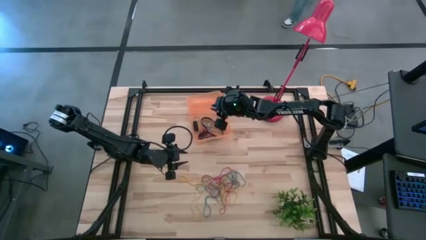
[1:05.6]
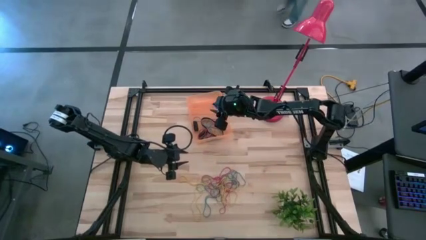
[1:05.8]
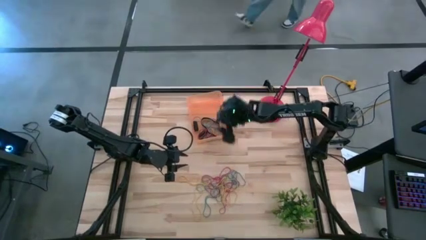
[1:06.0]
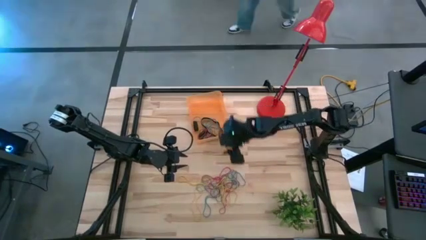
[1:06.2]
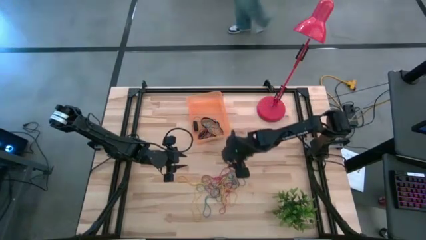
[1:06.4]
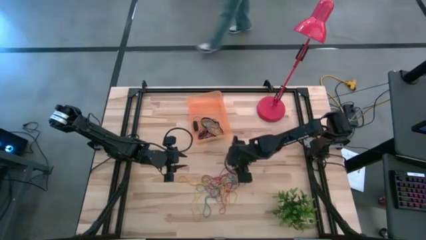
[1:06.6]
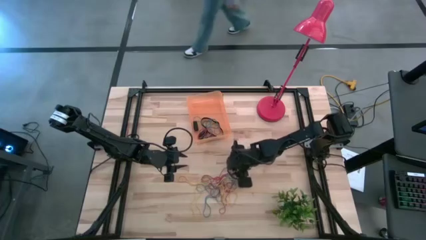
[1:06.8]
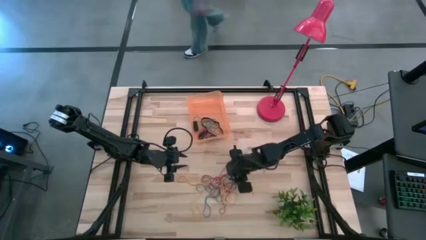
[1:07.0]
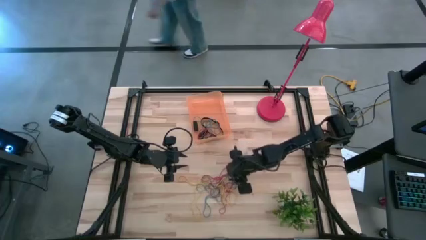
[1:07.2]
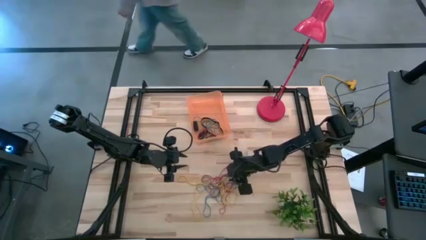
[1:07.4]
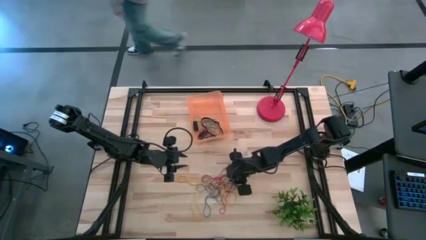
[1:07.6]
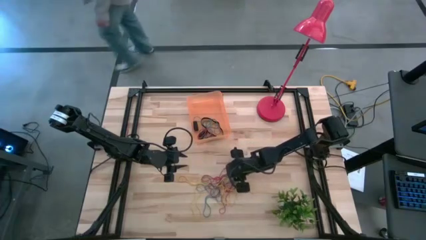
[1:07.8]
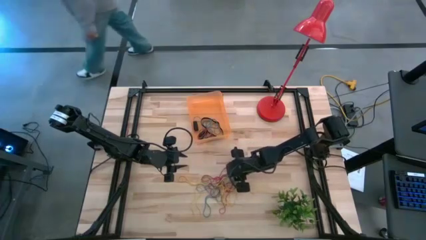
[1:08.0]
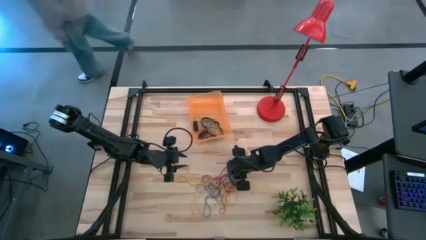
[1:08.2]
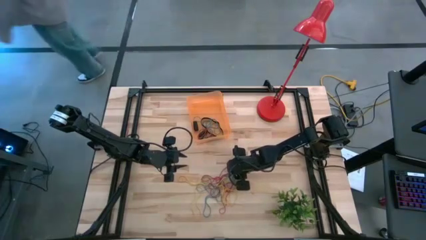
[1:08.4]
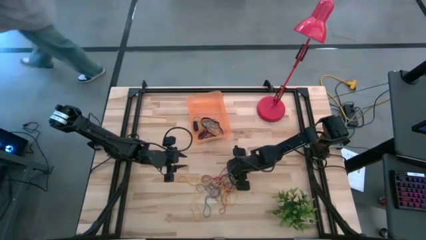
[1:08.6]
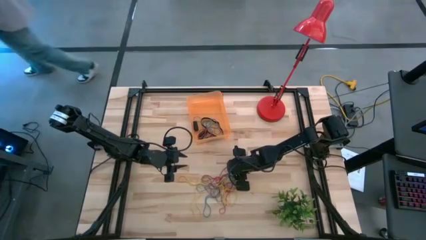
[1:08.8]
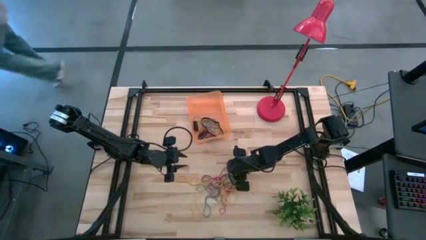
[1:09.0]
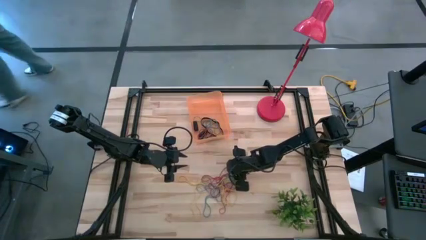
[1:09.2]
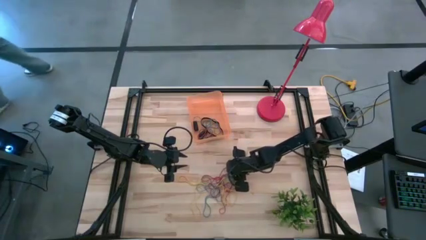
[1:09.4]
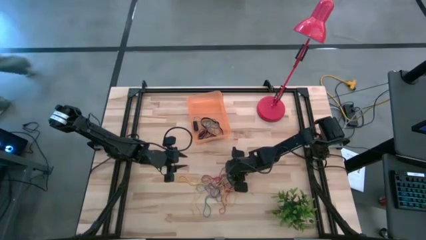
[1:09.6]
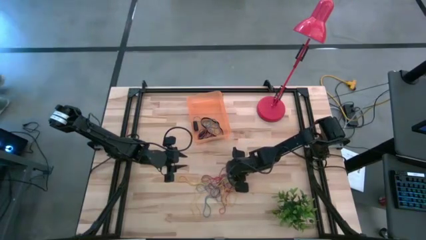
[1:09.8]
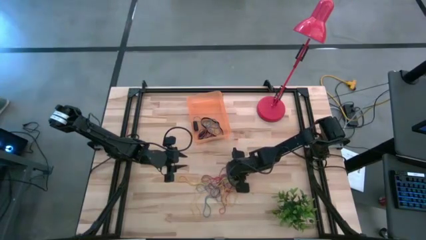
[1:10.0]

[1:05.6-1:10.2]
Task: Pick and place rubber bands into bin
Put the blue rubber band into the orange bin

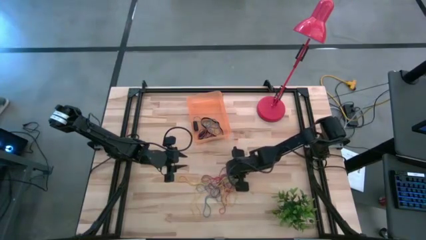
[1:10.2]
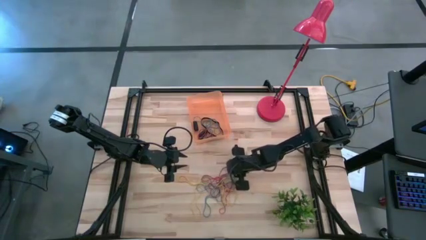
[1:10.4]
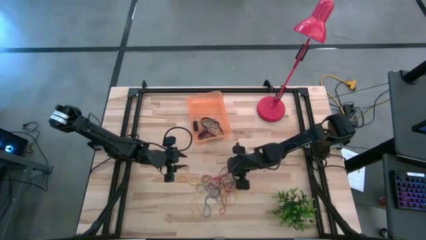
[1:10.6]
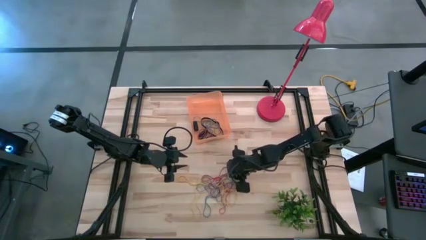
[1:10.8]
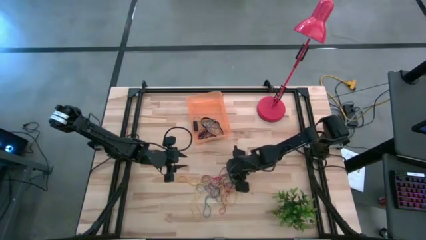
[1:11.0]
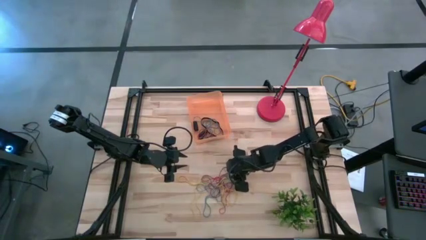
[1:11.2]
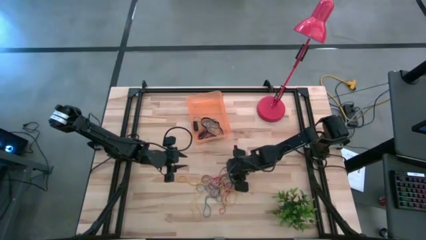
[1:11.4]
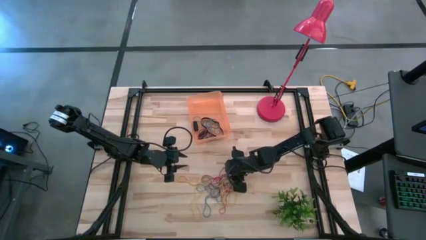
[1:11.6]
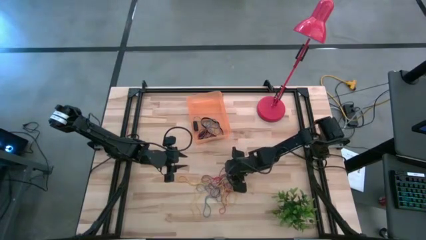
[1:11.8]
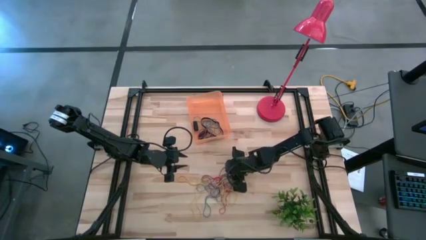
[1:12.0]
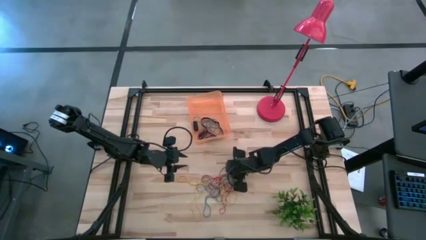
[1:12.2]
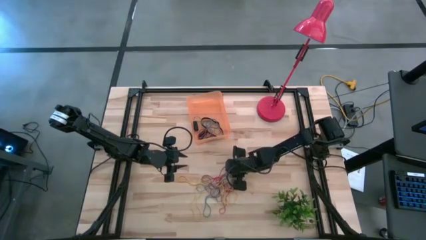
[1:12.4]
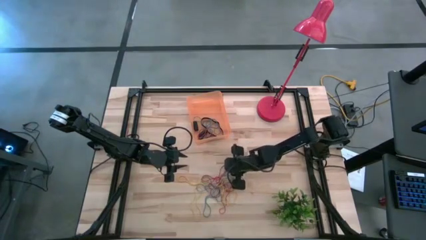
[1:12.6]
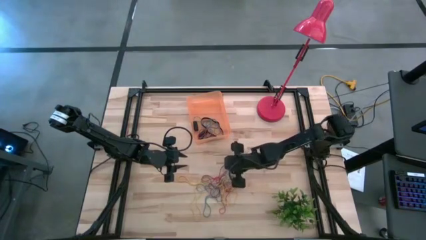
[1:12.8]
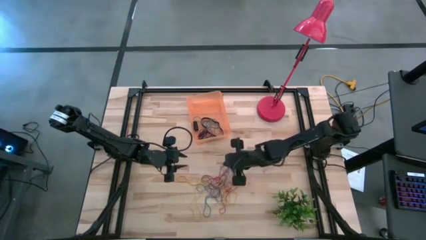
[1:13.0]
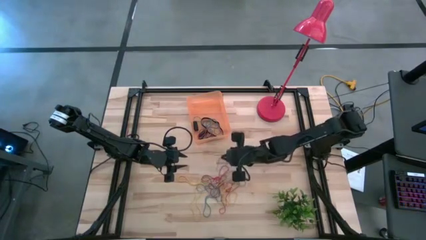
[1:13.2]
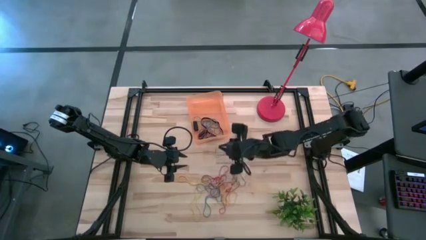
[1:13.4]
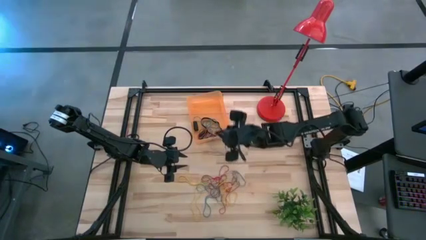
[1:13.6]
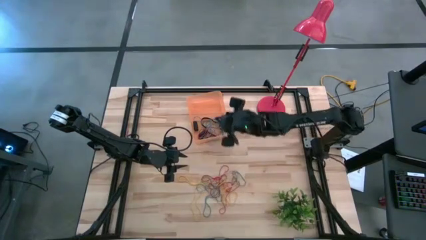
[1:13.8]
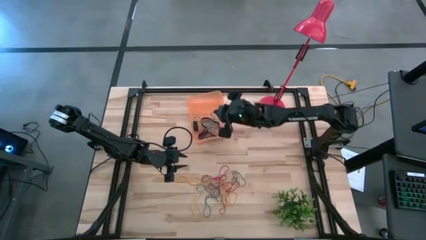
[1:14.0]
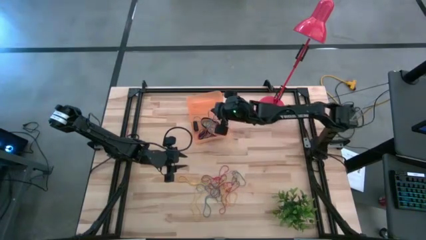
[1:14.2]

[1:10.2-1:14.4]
Put the blue rubber band into the orange bin

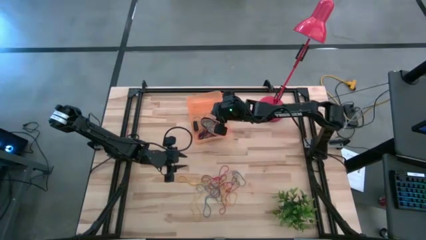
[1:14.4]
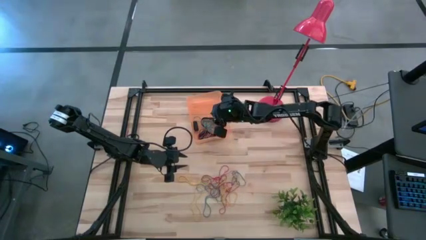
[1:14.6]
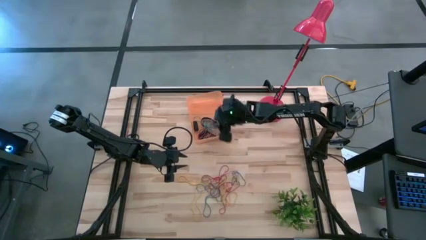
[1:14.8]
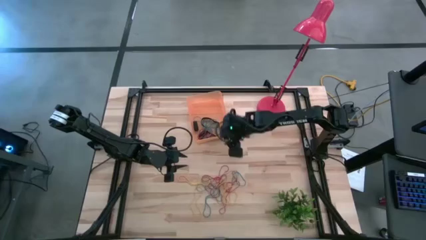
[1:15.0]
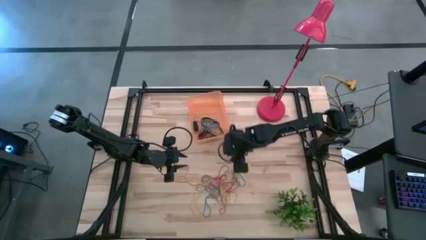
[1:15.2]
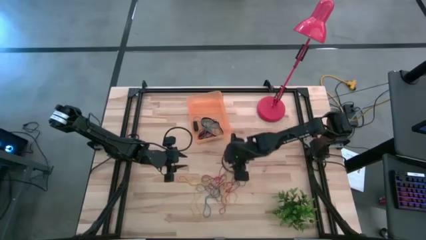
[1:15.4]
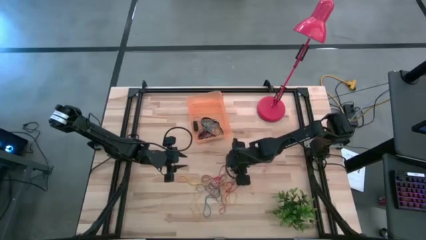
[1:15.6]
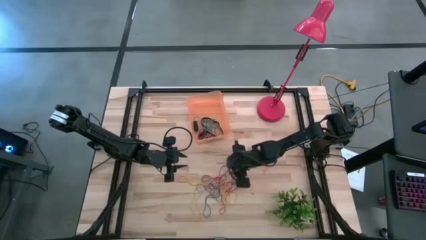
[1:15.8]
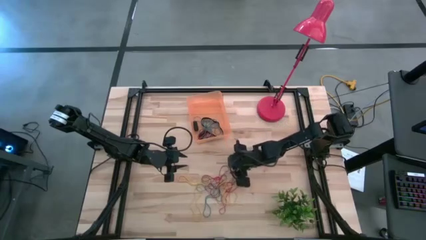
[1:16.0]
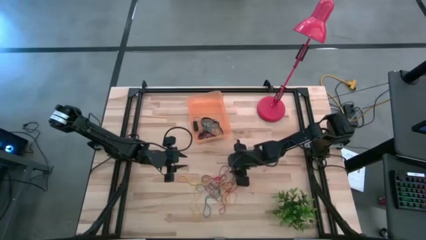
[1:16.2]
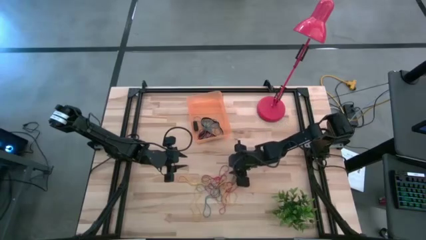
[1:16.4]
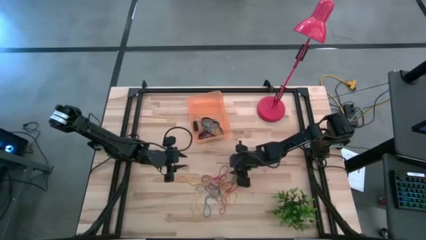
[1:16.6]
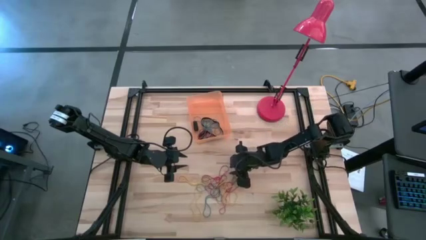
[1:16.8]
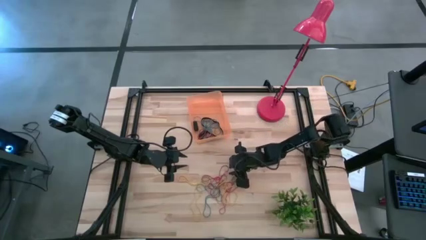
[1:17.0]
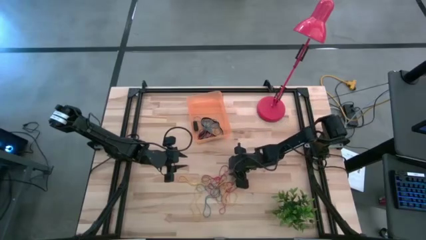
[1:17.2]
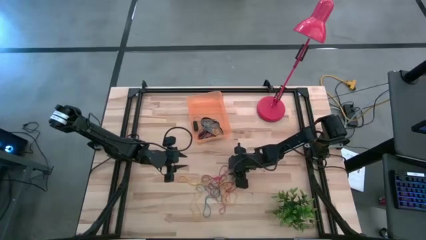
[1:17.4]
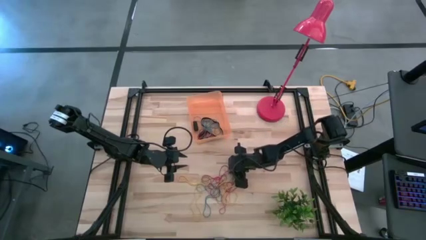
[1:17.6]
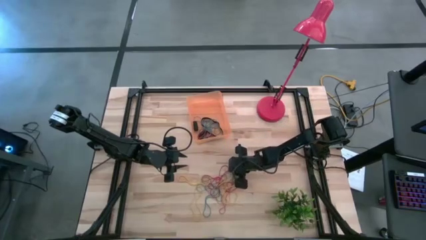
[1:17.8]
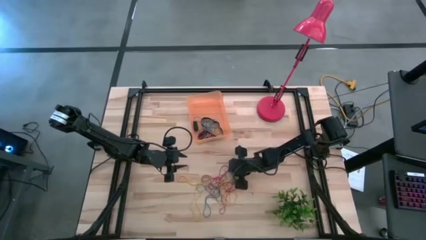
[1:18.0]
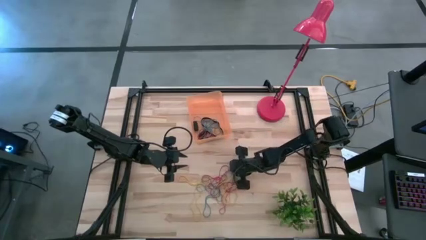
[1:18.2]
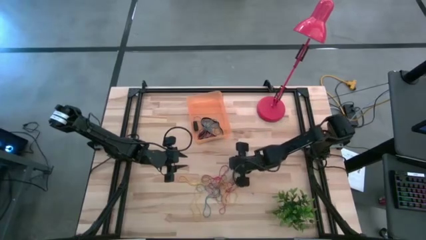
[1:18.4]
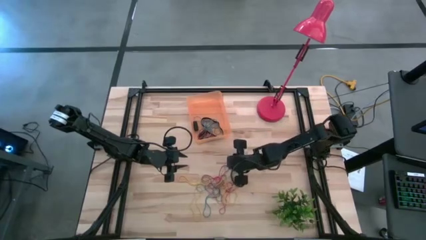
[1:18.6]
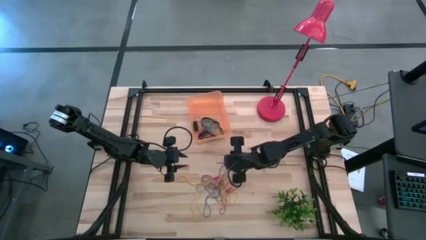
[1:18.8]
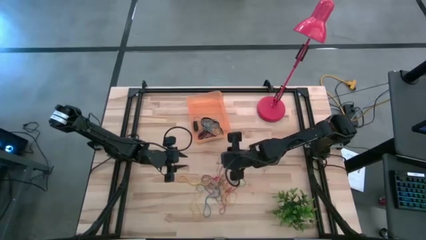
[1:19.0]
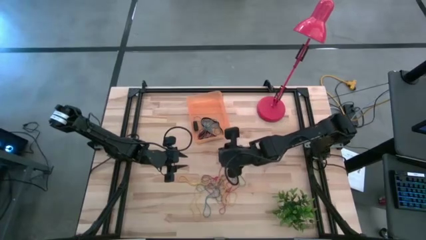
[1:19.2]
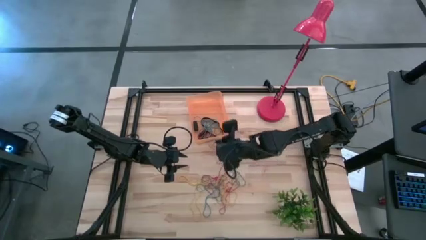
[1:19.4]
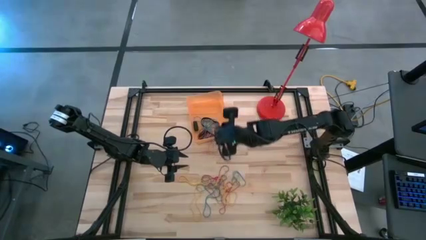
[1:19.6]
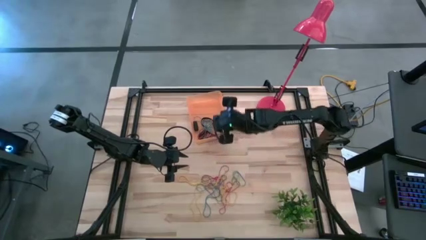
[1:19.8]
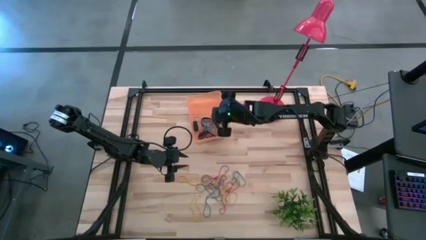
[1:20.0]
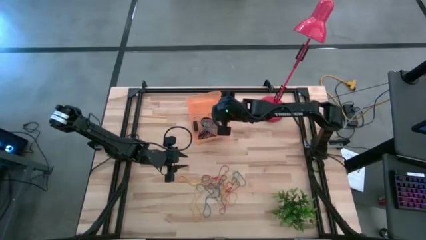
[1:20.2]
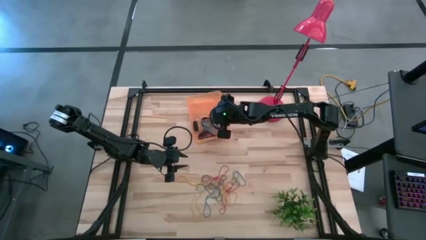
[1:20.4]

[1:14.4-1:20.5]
Put the red rubber band into the orange bin

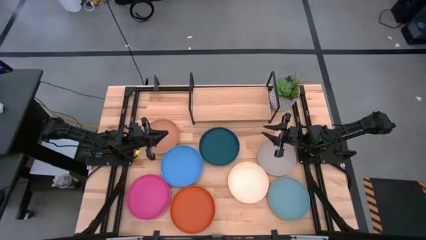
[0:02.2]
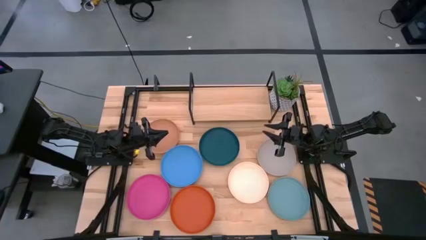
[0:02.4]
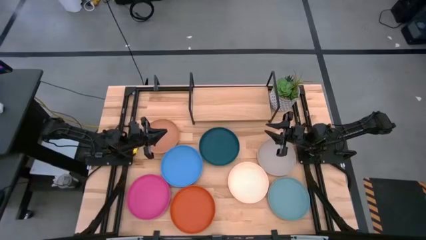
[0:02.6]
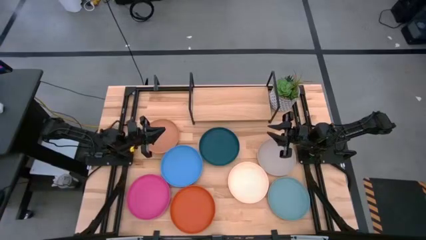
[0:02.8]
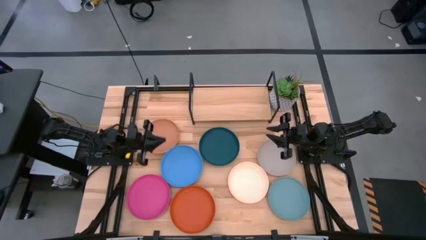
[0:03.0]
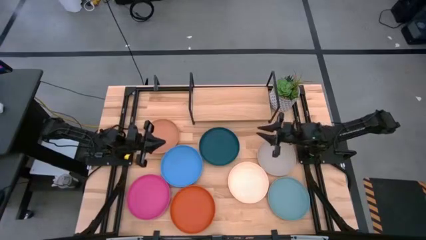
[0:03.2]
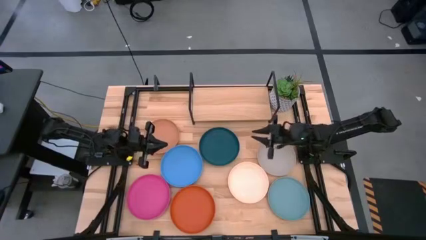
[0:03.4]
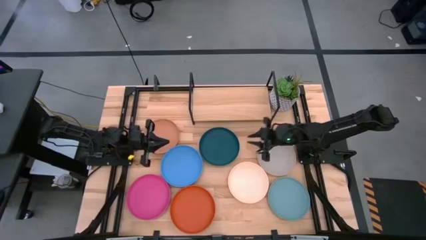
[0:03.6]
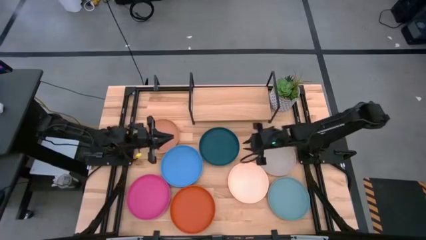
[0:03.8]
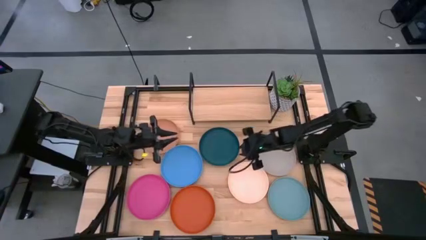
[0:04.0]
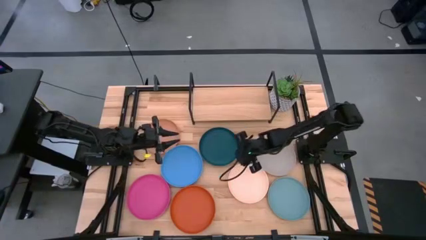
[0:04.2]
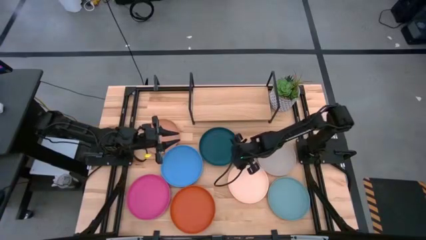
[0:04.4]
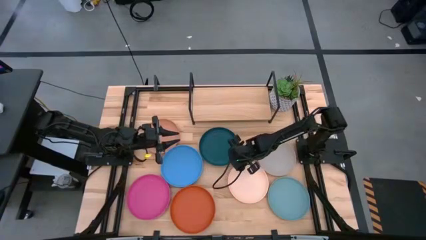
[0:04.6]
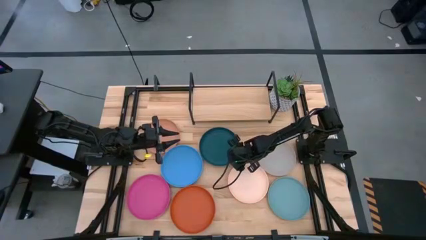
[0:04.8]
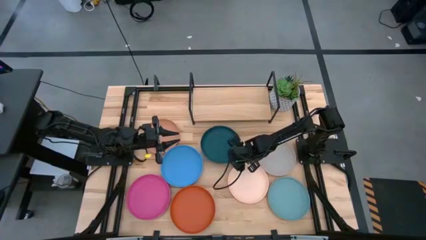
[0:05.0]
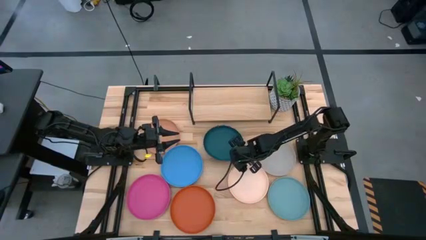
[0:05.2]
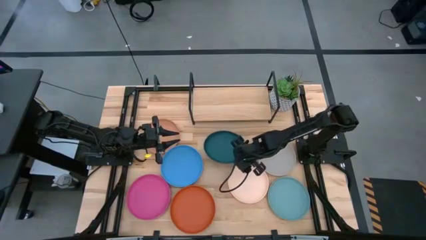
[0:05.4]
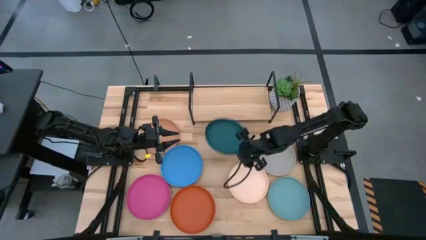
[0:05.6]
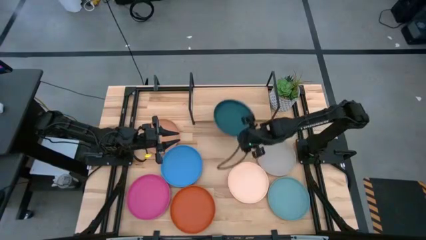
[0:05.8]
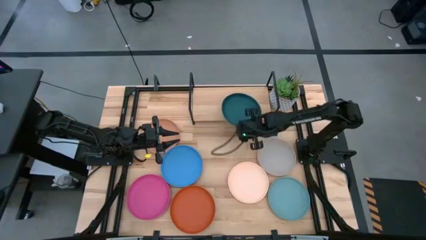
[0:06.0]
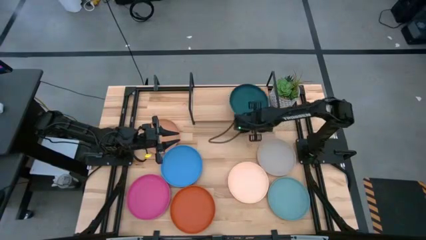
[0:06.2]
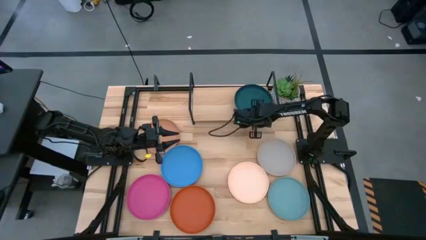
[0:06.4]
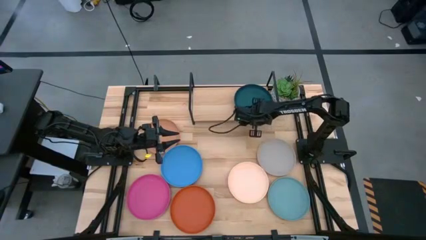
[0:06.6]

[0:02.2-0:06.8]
Task: Place and stack plates onto a shelf
Put the dark blue plate on the shelf
